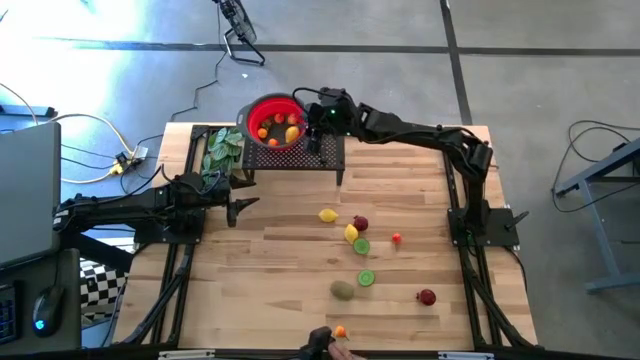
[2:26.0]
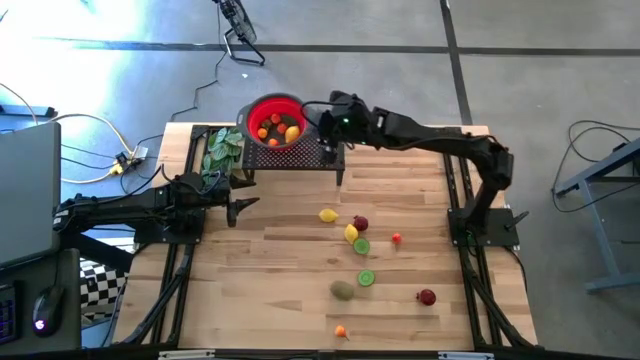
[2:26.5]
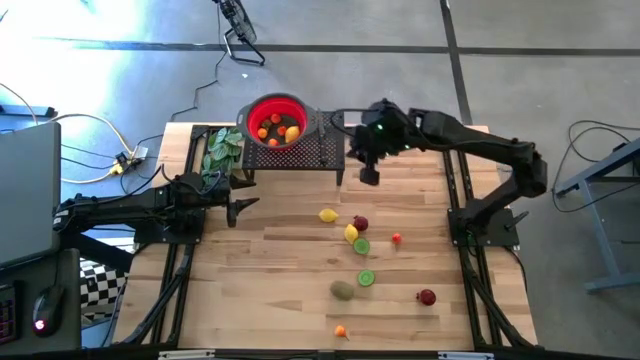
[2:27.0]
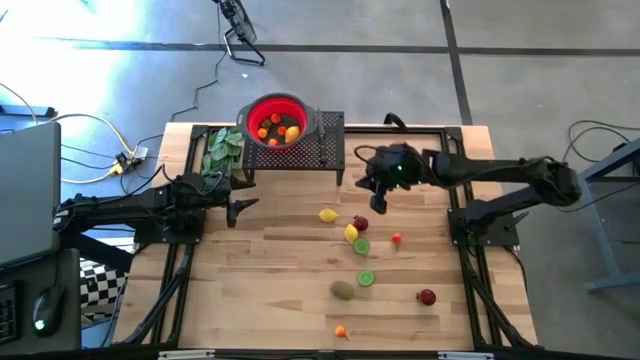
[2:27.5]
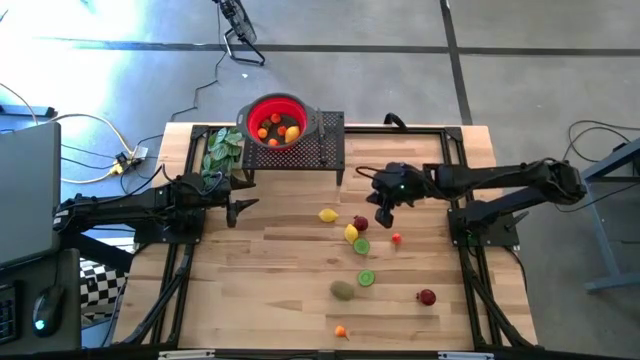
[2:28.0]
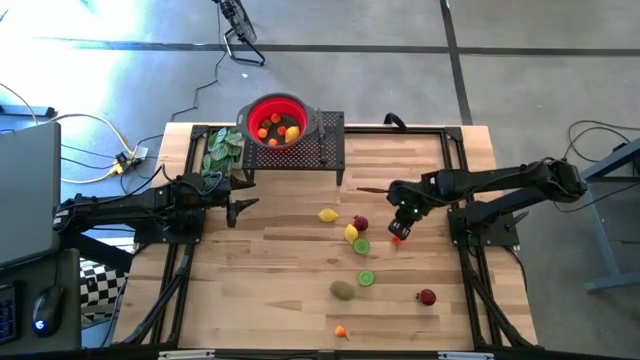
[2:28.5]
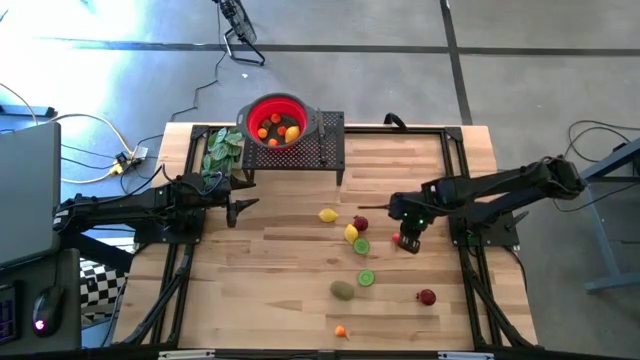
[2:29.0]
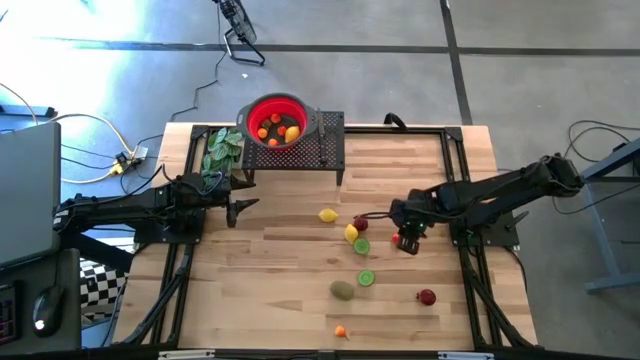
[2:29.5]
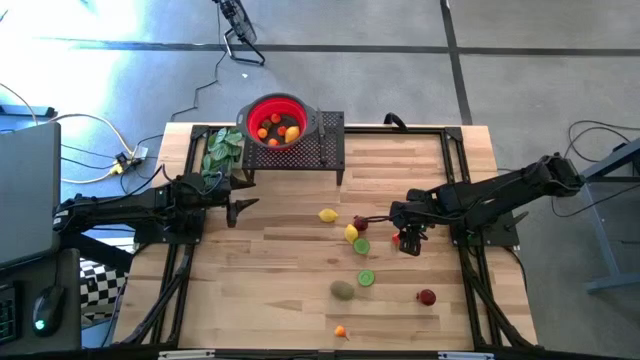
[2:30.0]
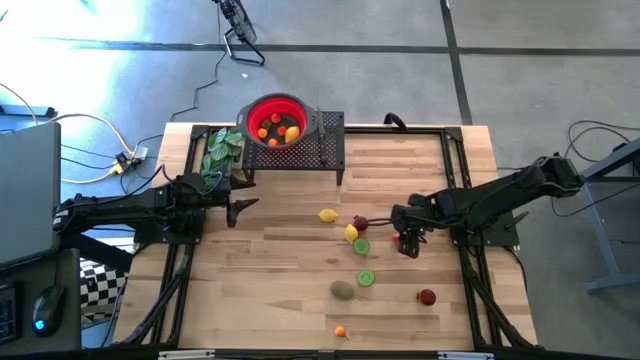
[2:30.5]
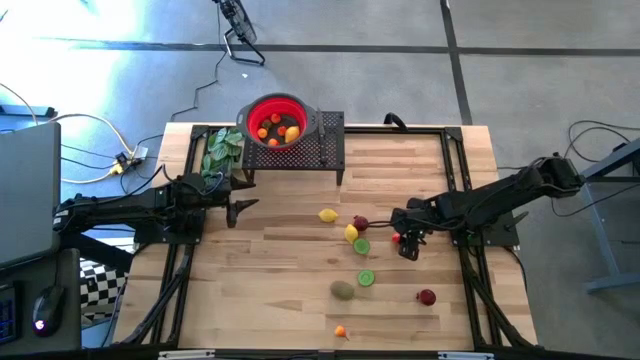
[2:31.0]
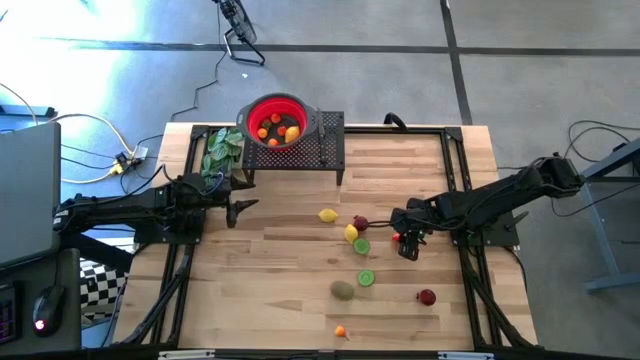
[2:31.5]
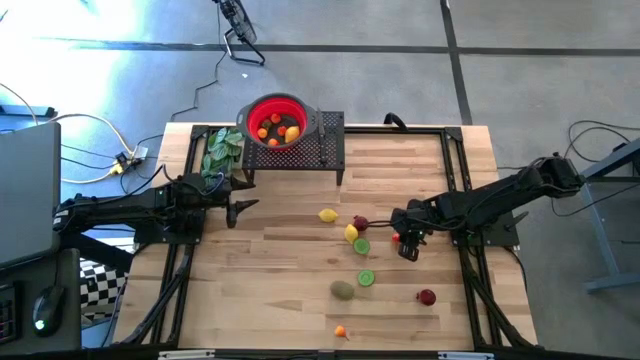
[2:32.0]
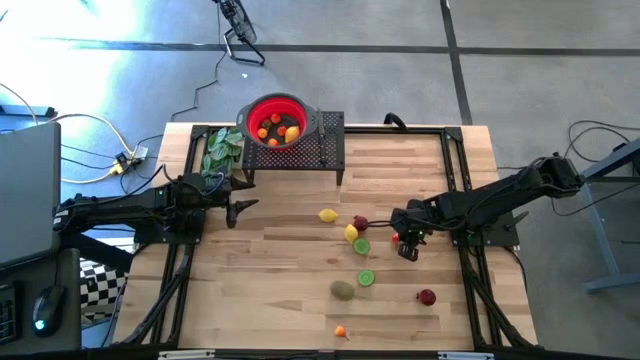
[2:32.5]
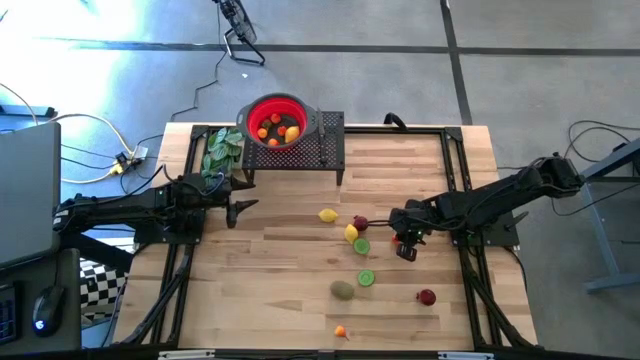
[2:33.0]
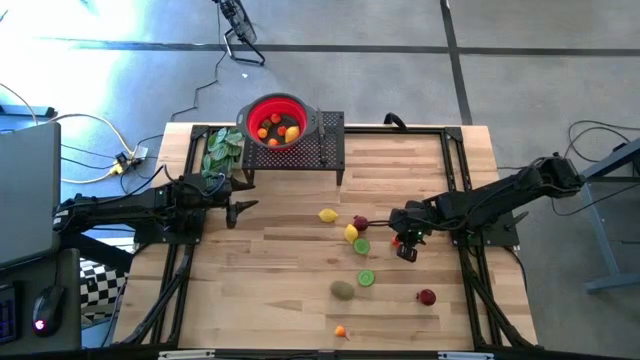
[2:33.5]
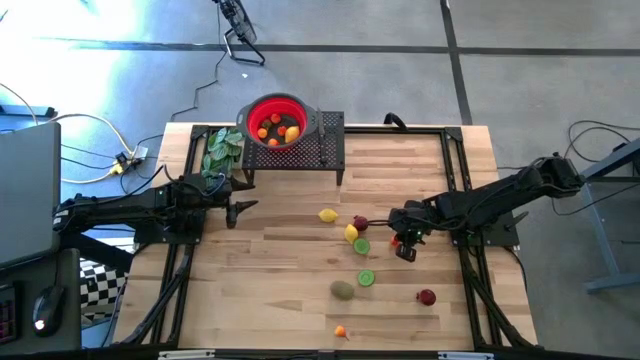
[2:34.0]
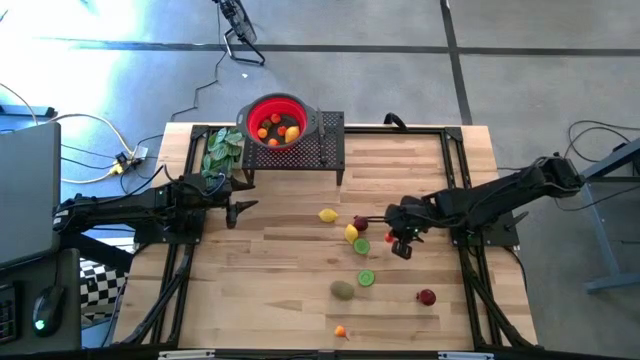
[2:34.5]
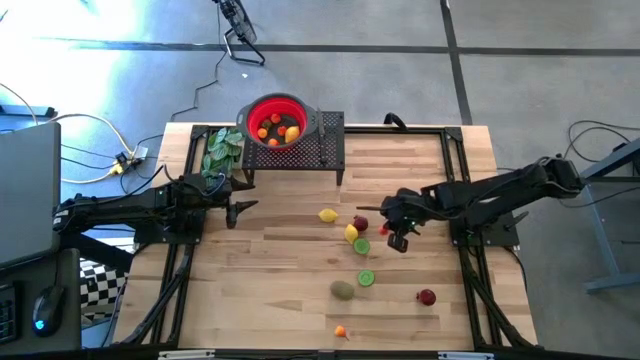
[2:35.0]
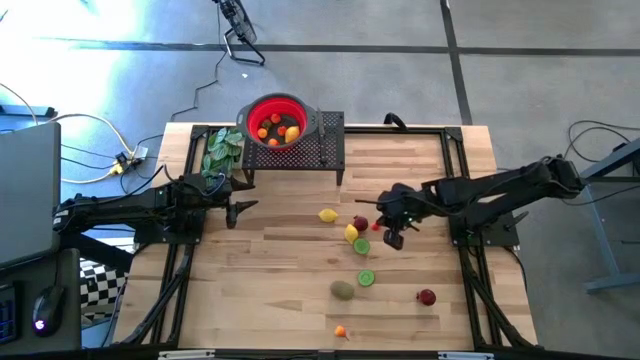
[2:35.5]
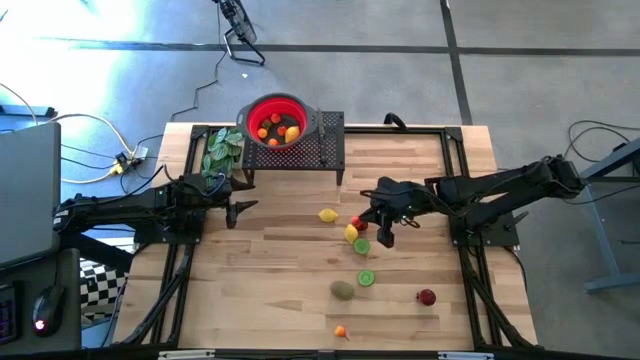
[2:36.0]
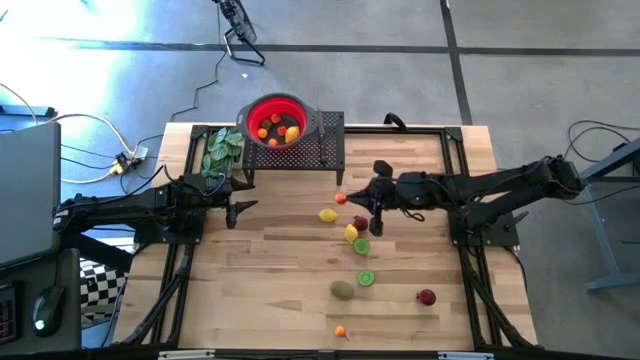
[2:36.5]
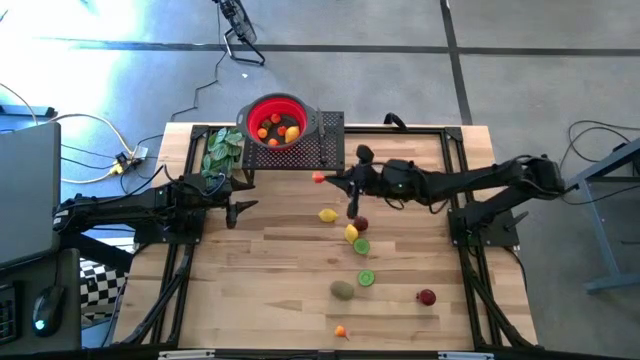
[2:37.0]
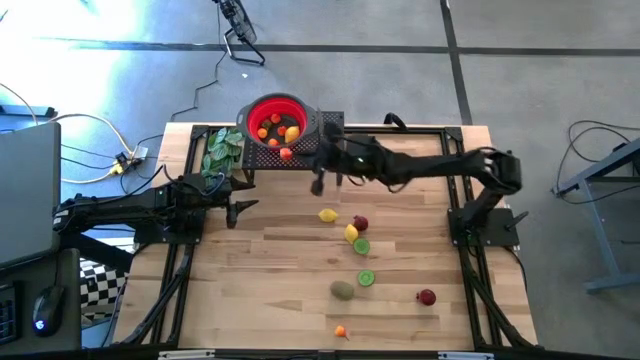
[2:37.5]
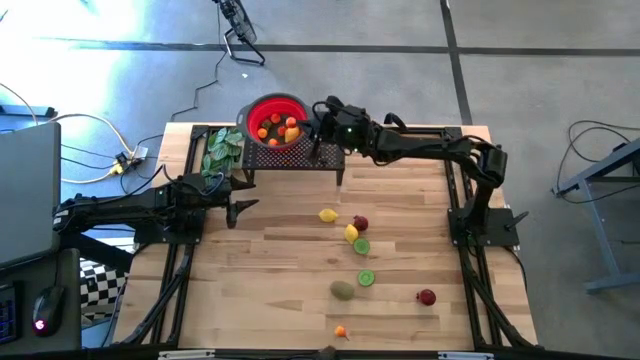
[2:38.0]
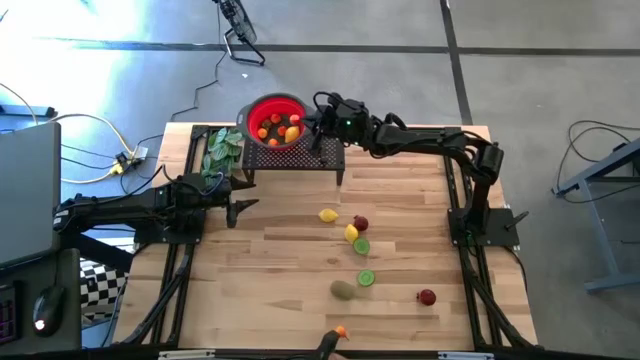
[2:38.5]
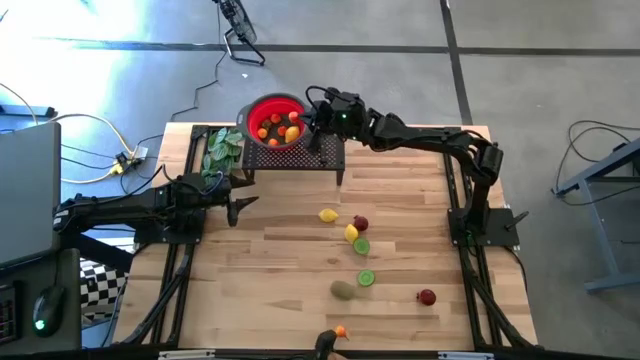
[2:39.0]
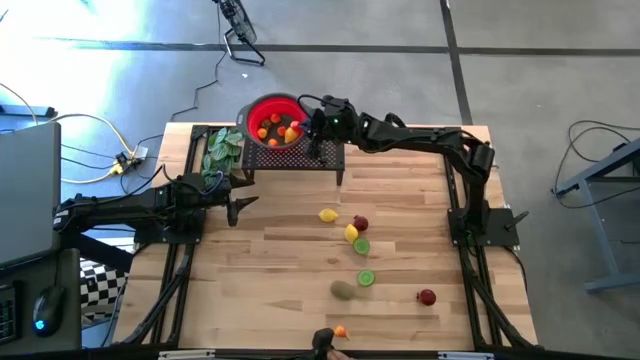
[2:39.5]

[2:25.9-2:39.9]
Task: Pick & Place Fruit
Put the orange pear into the red strainer bowl on the shelf

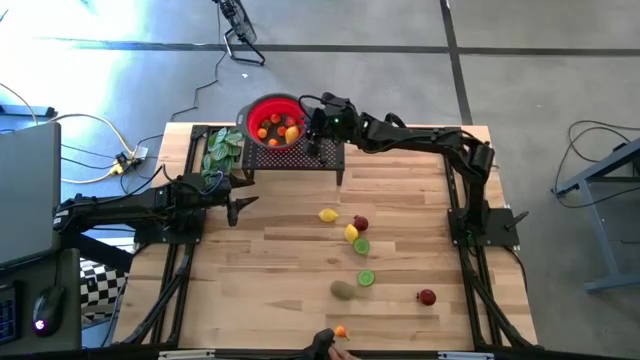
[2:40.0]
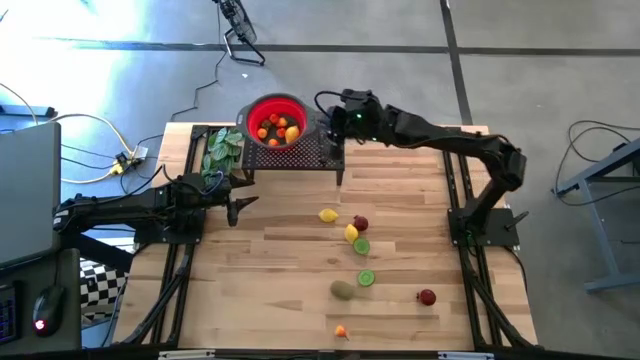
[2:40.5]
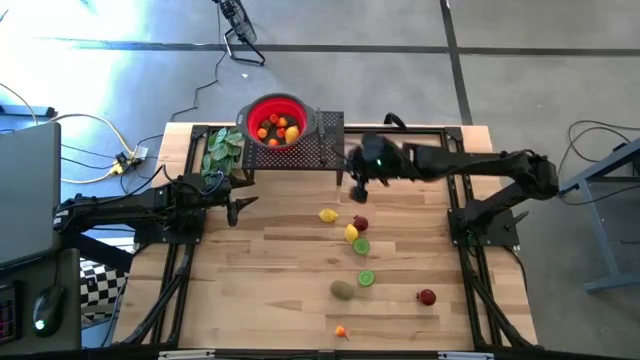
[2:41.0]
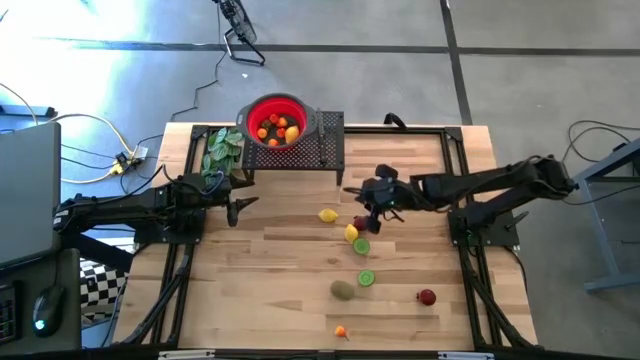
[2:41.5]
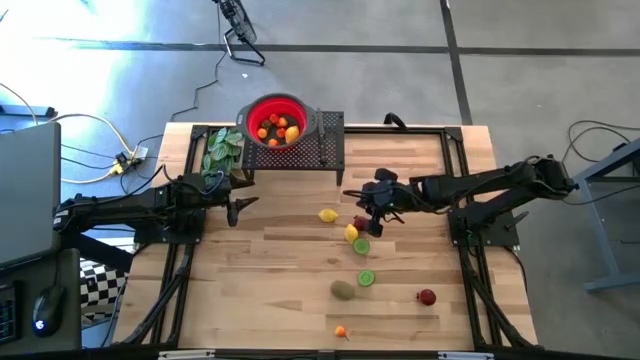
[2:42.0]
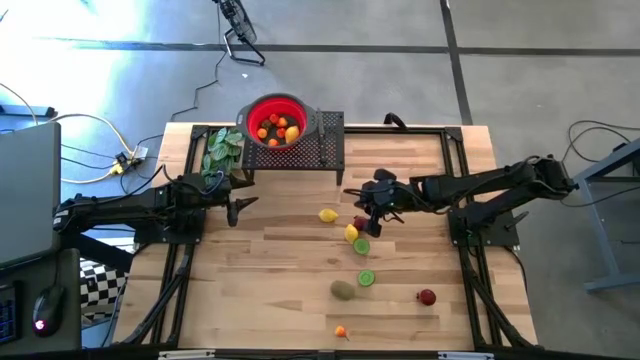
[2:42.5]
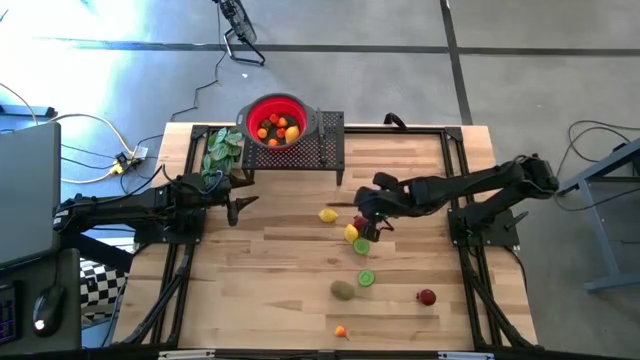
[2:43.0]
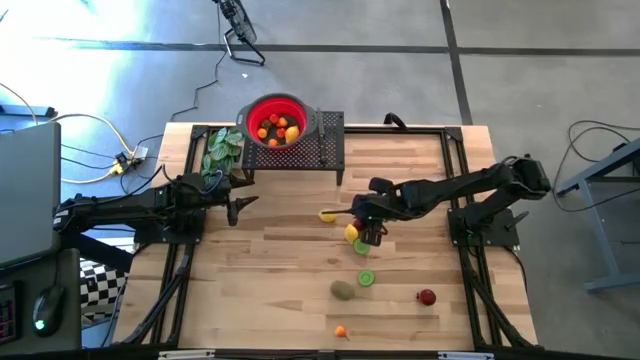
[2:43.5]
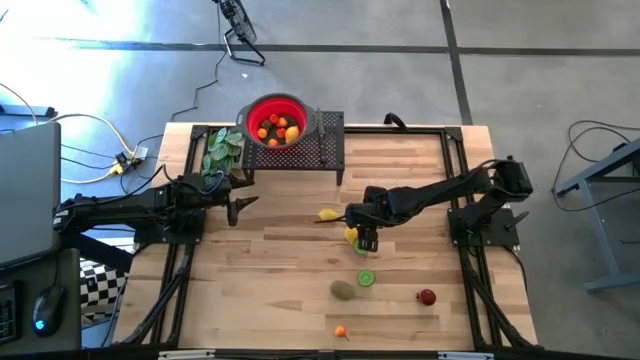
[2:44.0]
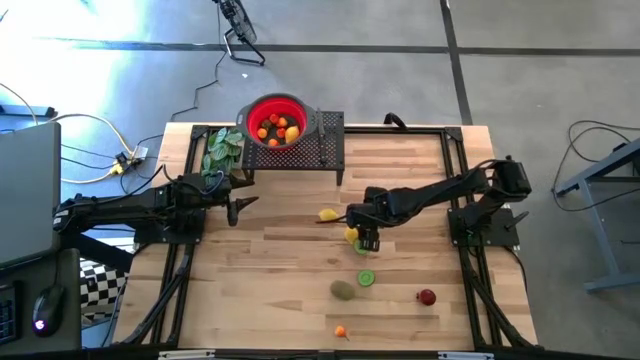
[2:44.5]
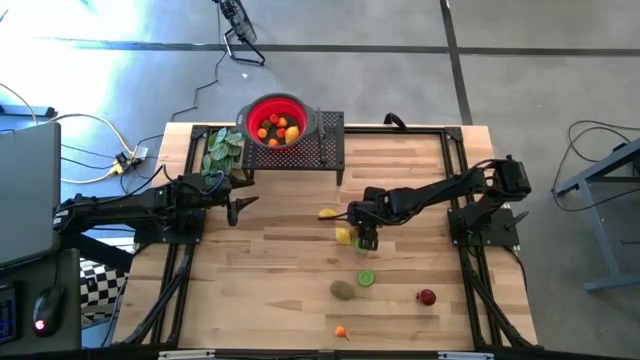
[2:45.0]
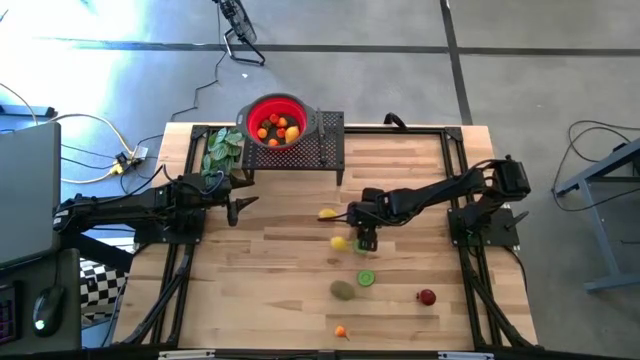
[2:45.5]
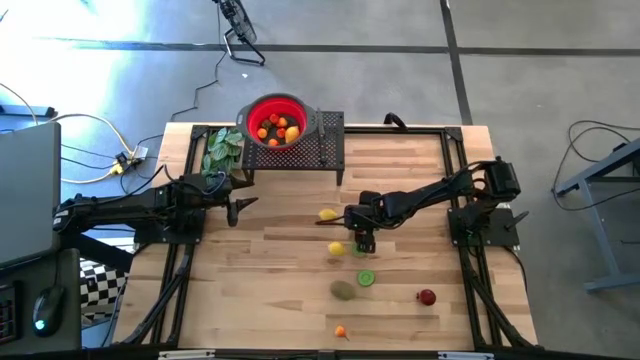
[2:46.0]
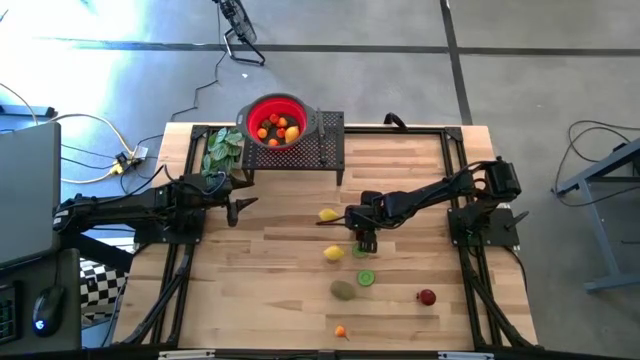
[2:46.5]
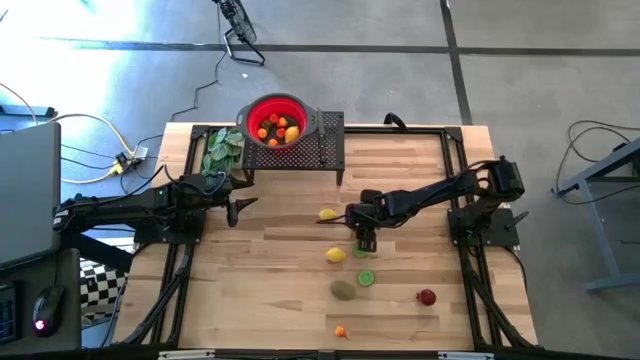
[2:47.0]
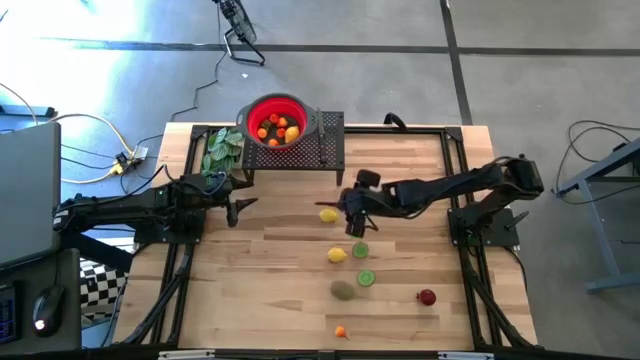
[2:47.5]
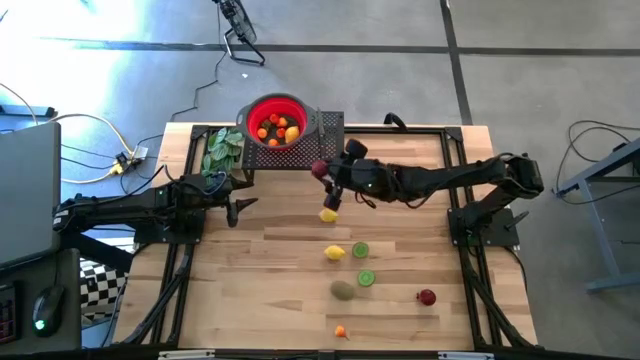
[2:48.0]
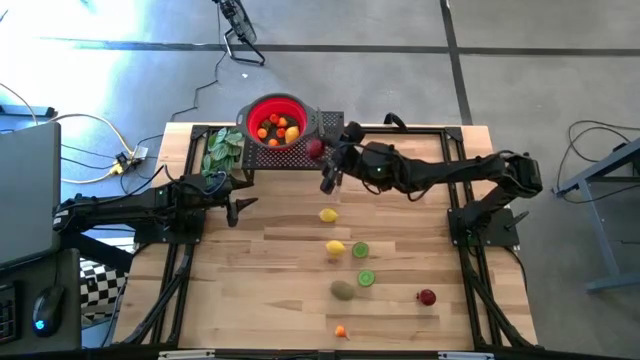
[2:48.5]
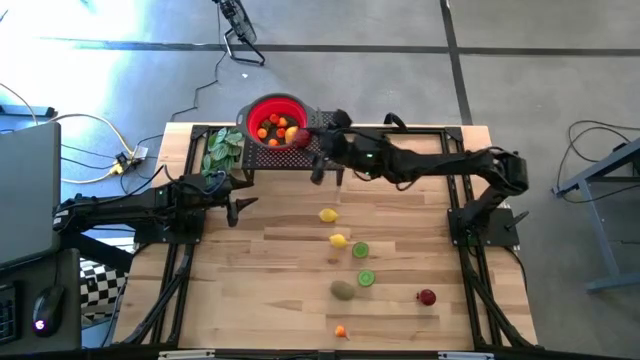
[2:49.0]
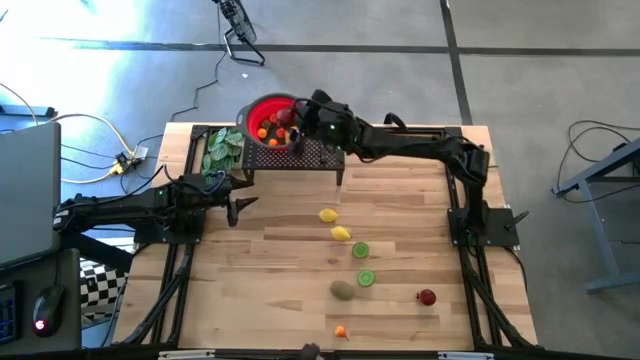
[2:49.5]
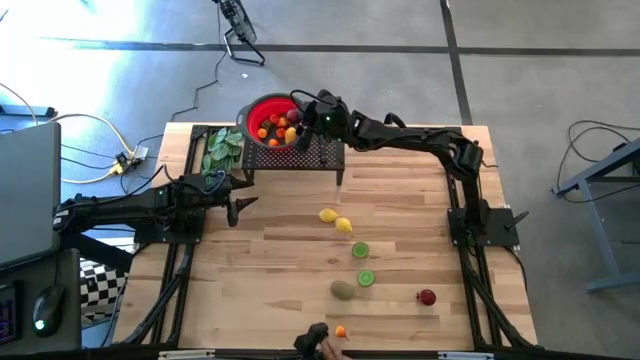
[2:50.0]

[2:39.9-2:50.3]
Put the red pomegranate into the red strainer bowl on the shelf
